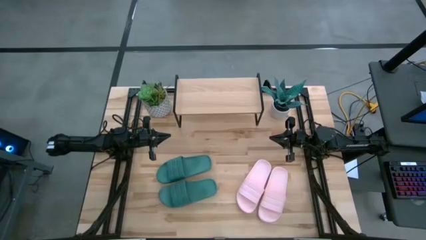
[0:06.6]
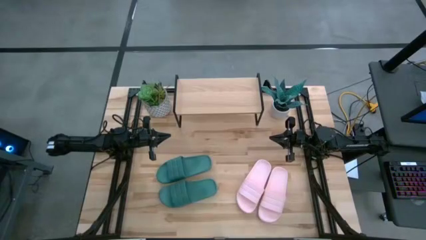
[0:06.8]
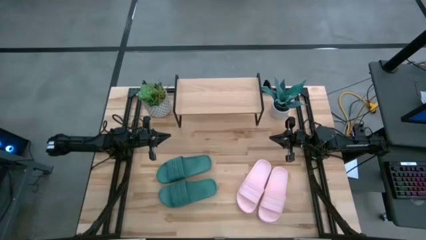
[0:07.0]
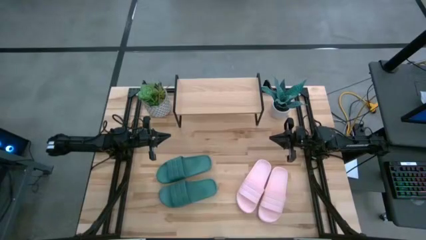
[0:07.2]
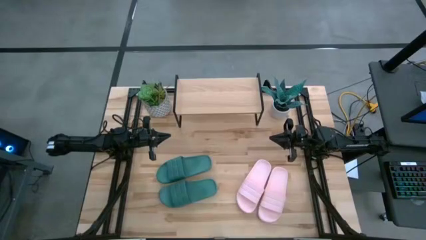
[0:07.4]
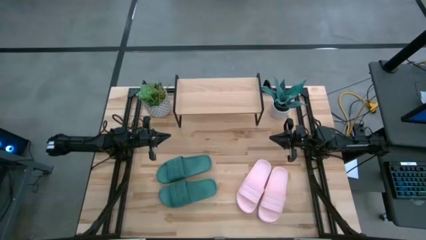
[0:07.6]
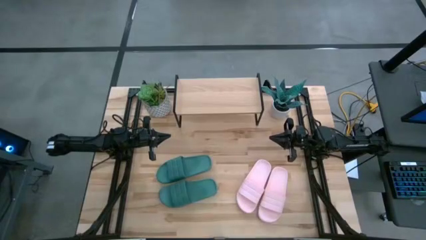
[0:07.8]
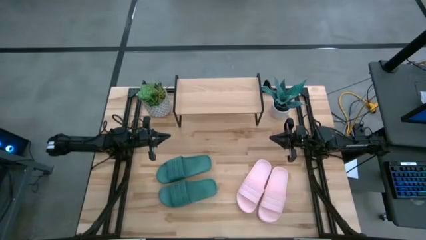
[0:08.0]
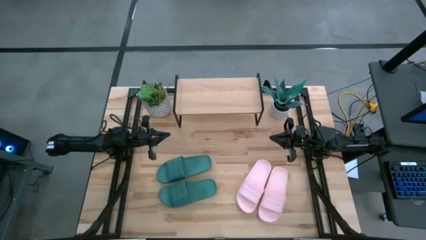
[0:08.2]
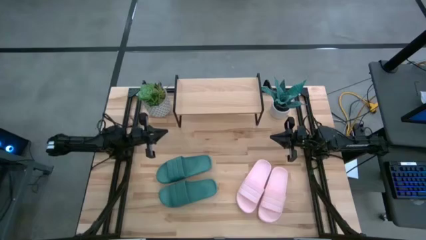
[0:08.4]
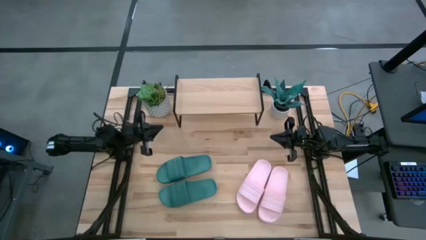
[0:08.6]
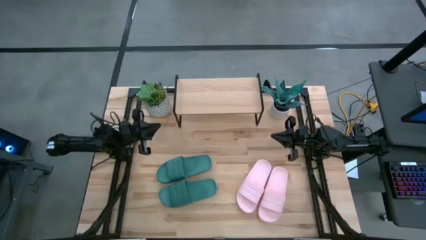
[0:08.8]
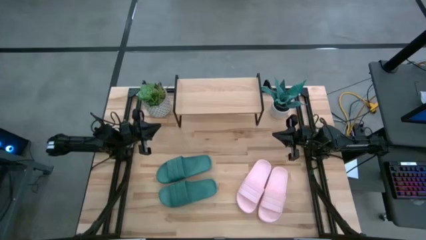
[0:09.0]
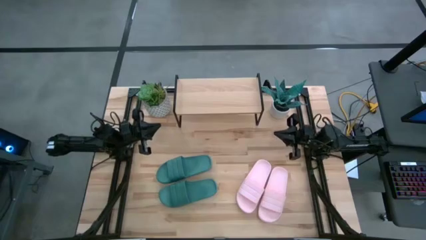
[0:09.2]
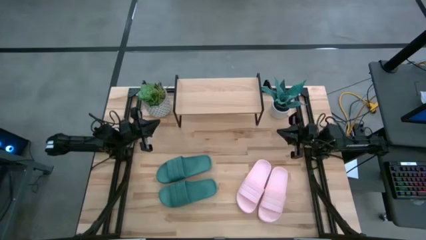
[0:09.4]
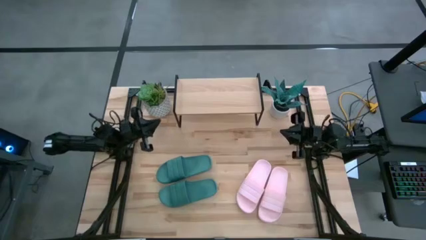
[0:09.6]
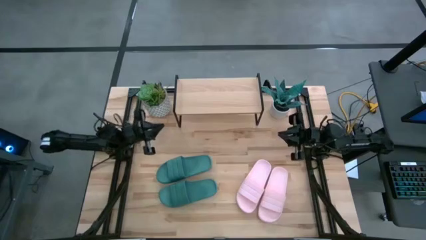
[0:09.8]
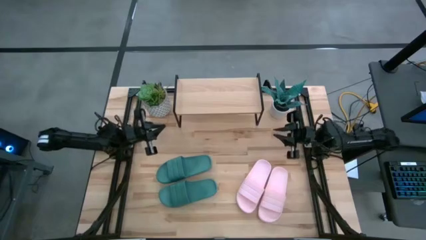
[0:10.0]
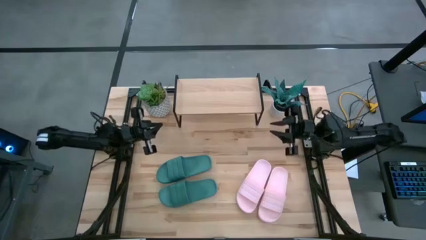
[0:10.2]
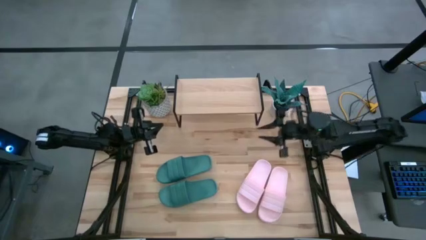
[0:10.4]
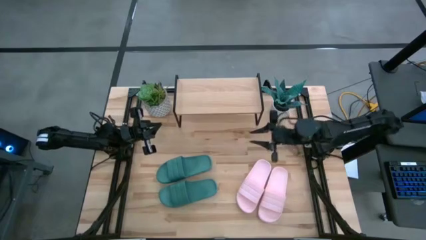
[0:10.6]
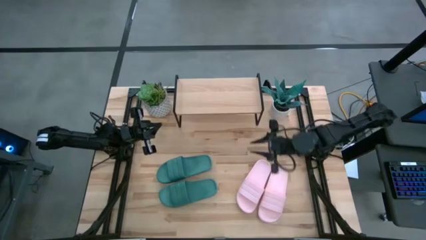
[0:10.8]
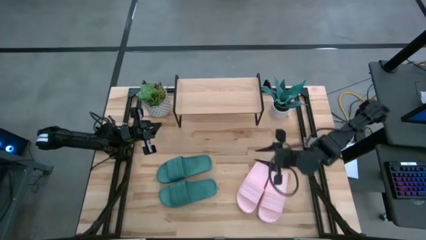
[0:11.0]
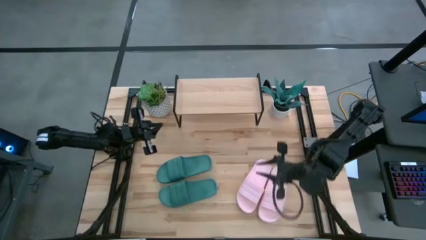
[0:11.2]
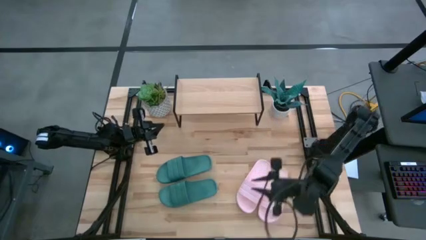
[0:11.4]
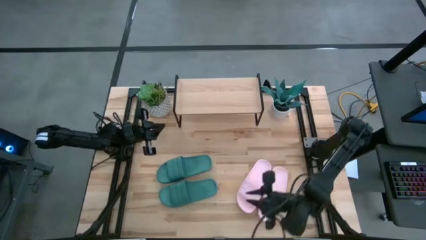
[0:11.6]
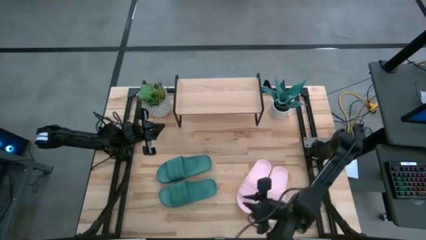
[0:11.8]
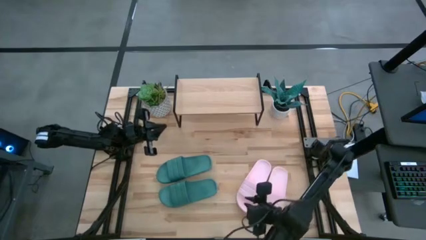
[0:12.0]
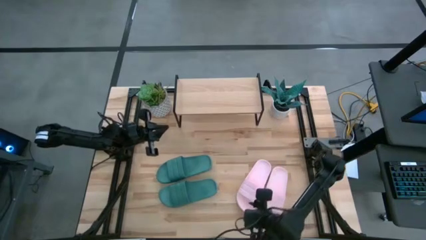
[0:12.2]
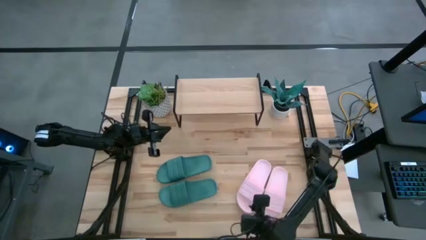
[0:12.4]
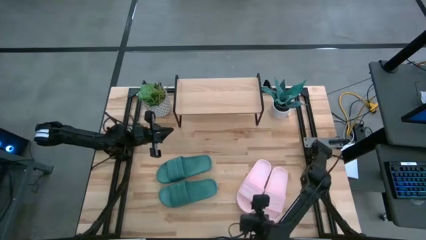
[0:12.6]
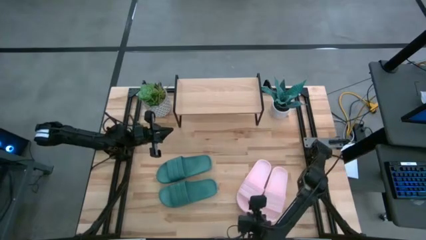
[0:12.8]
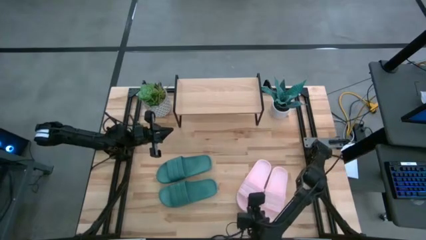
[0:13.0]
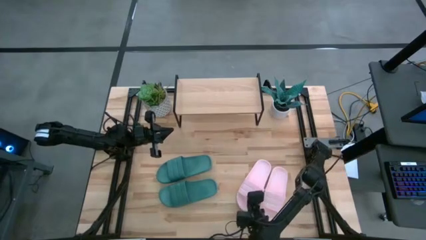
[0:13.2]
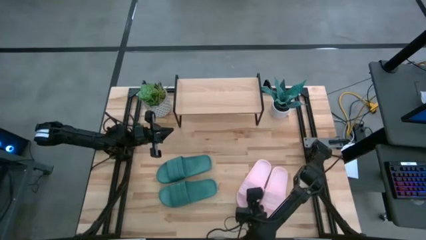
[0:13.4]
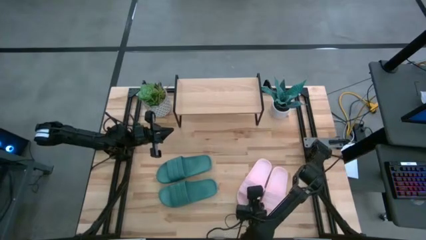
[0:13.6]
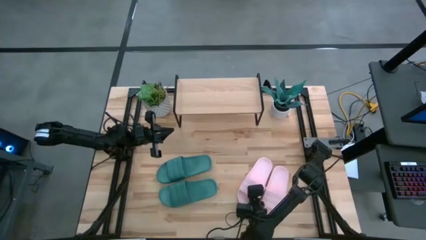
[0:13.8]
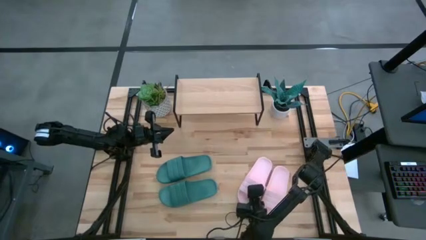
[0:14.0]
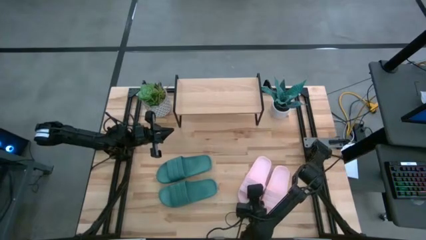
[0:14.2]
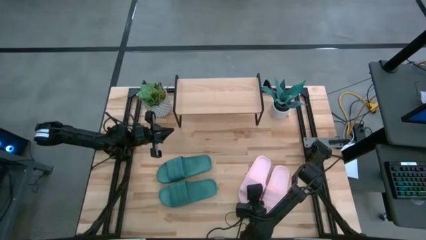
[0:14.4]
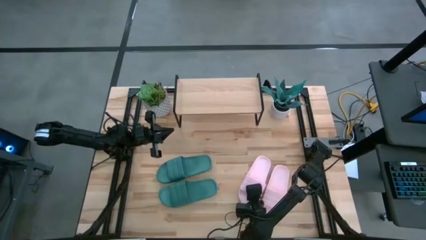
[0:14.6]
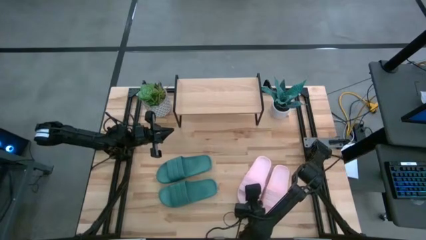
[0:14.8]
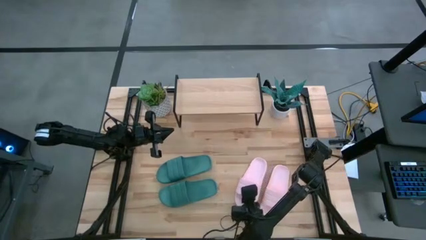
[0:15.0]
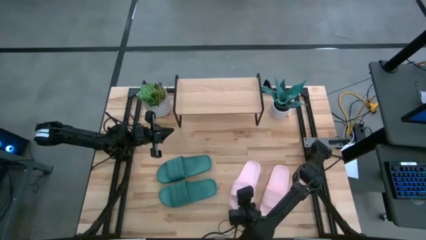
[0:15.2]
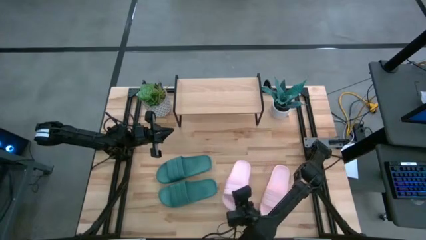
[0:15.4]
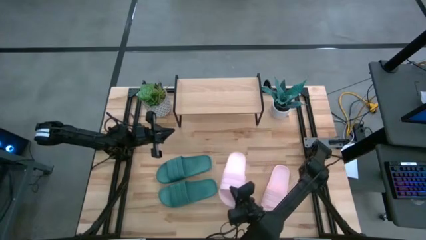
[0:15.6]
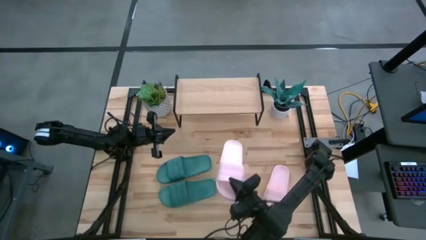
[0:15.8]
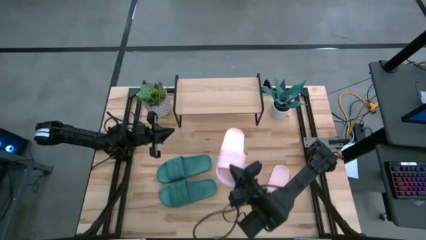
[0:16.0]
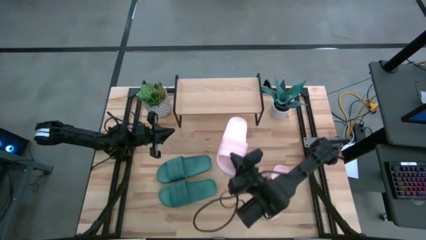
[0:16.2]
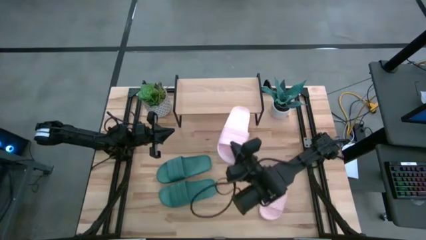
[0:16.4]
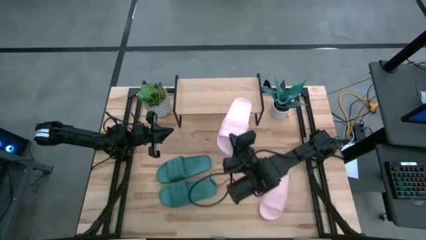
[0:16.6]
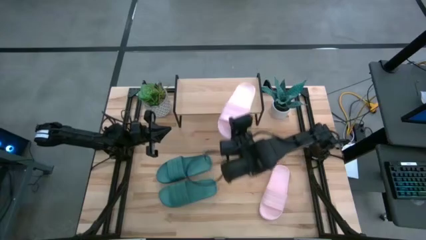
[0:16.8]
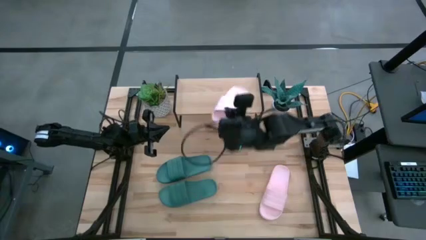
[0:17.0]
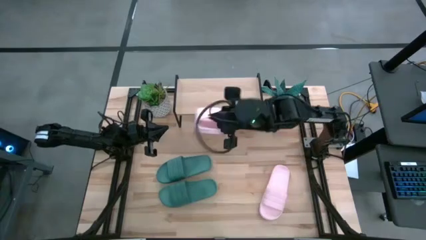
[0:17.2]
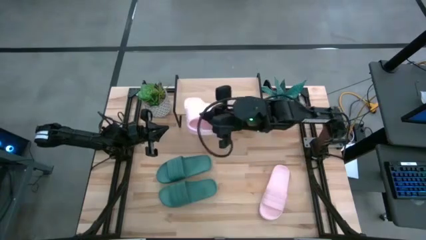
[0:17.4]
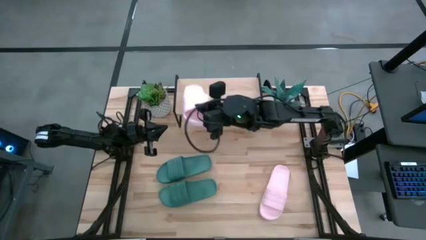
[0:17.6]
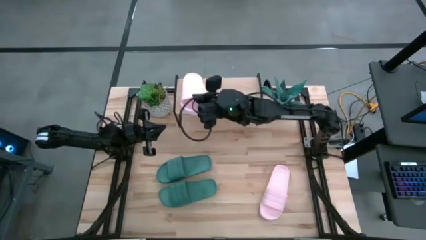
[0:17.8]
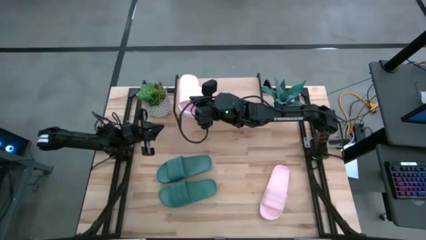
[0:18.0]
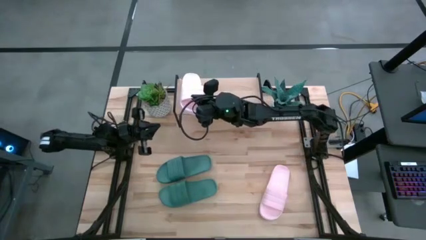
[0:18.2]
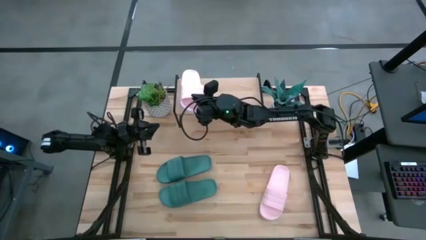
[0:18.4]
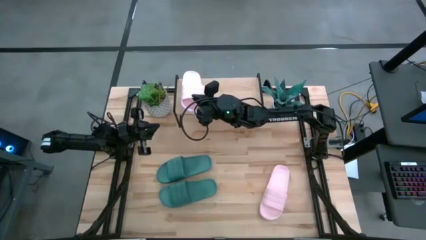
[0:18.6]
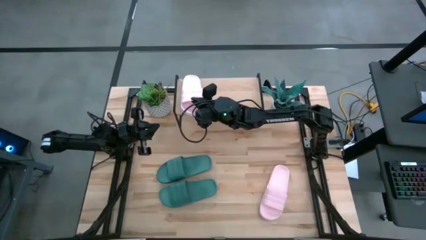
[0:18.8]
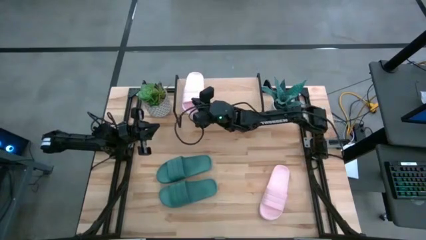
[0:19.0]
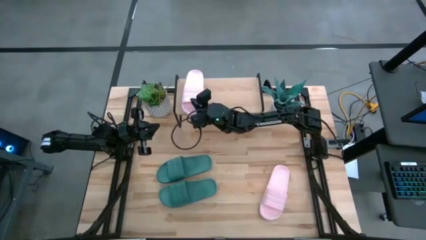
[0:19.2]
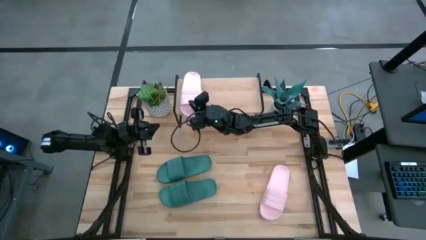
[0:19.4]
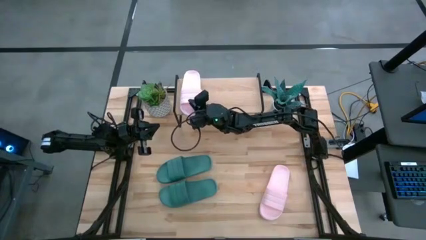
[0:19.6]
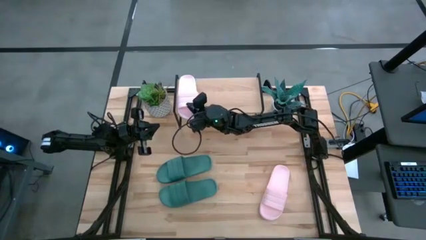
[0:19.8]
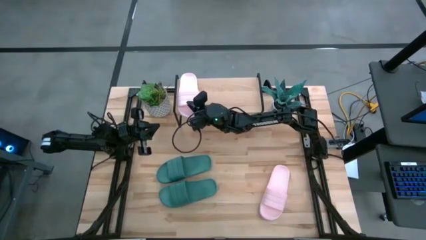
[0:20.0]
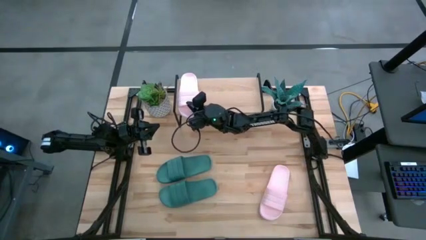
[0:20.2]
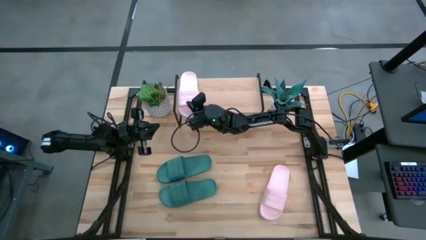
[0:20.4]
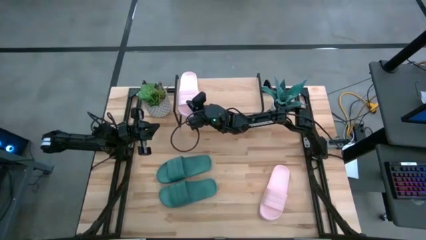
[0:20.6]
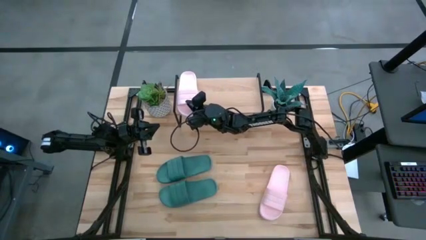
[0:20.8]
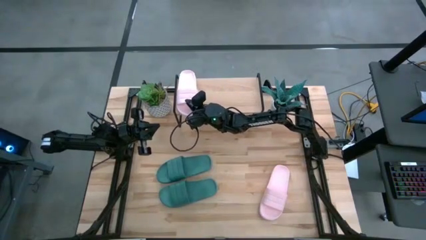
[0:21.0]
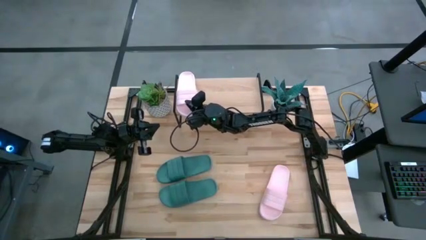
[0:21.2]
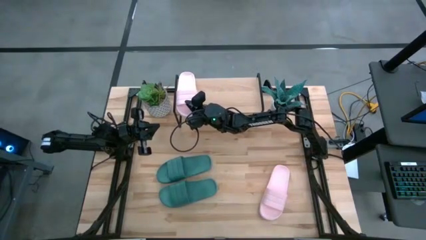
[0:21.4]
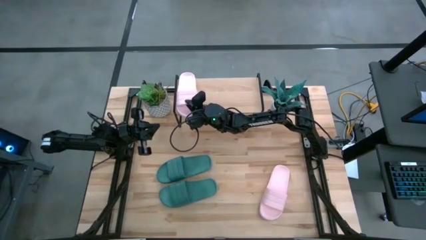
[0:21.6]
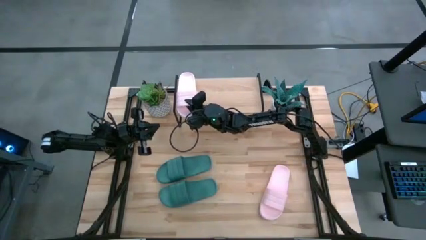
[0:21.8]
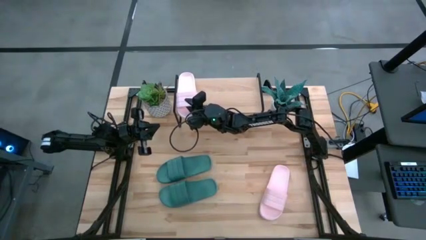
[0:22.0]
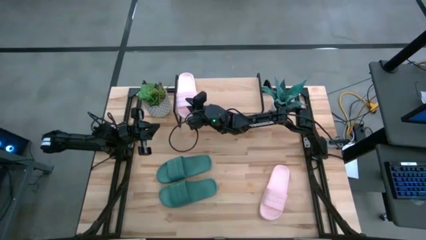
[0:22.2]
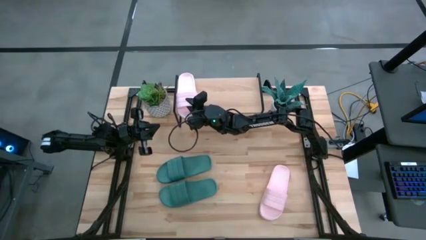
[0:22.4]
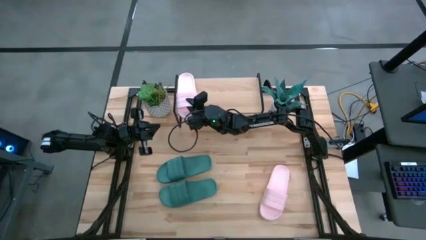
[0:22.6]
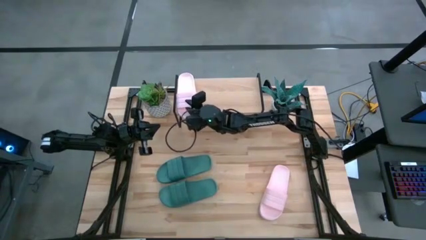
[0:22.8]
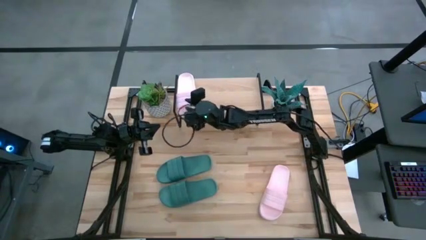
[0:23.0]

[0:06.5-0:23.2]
Task: Pick and place slides into the shelf
Put the left pink slipper on the shelf
